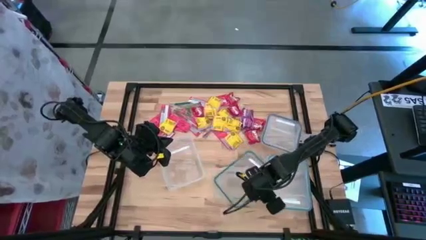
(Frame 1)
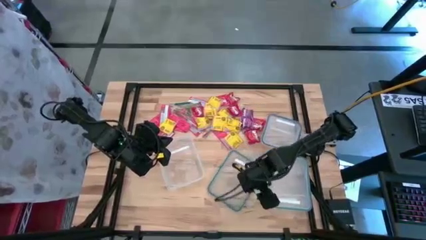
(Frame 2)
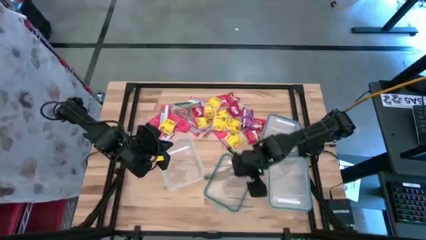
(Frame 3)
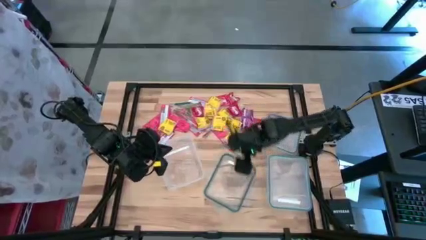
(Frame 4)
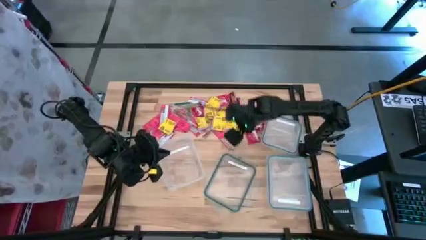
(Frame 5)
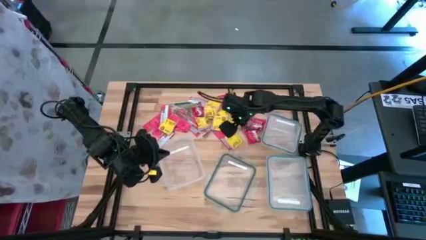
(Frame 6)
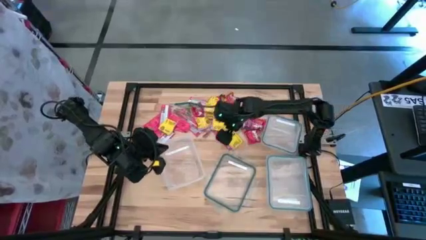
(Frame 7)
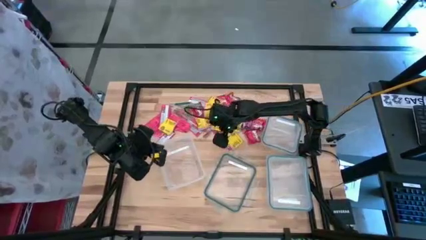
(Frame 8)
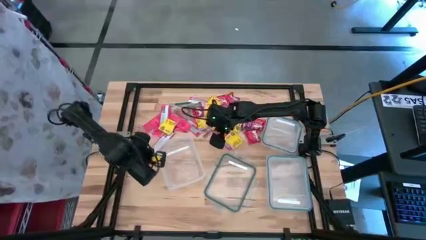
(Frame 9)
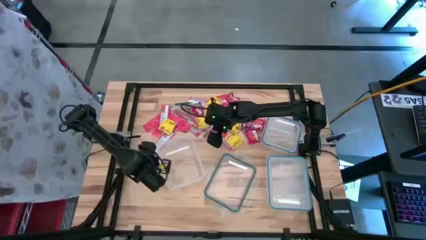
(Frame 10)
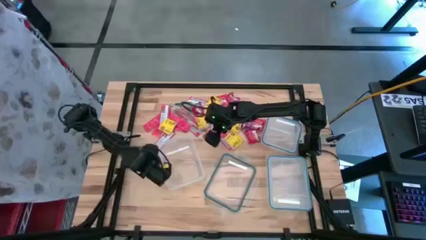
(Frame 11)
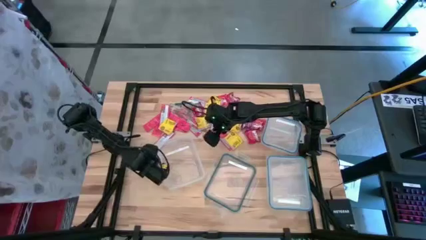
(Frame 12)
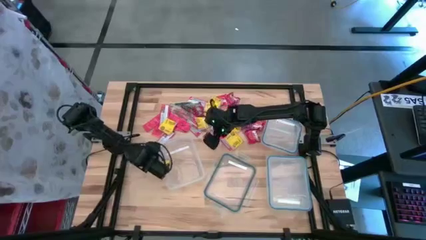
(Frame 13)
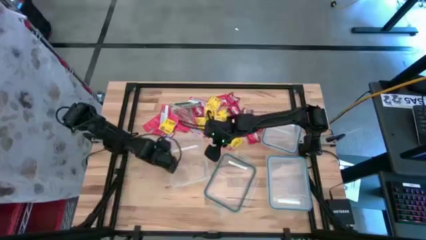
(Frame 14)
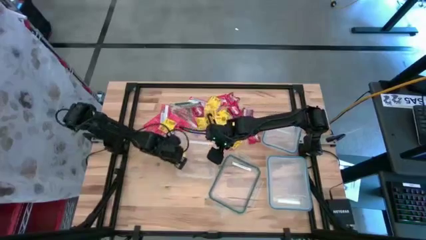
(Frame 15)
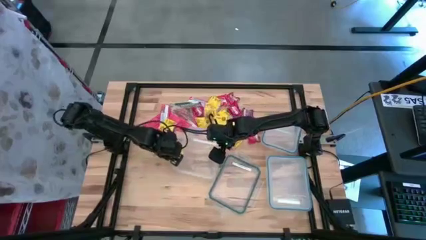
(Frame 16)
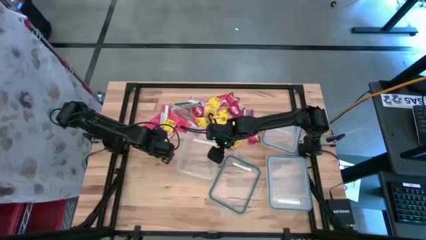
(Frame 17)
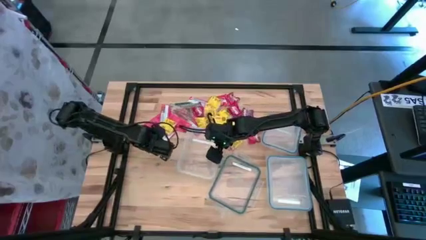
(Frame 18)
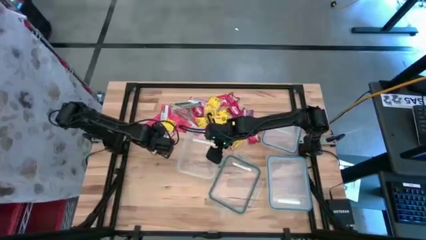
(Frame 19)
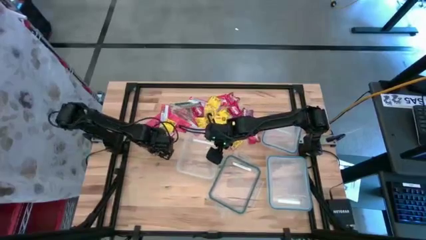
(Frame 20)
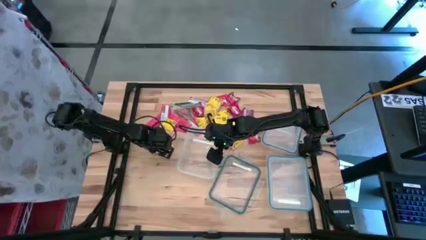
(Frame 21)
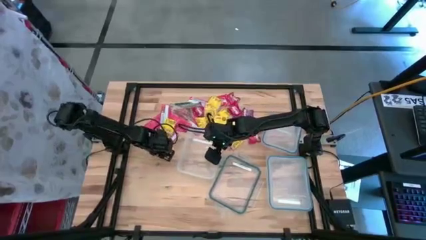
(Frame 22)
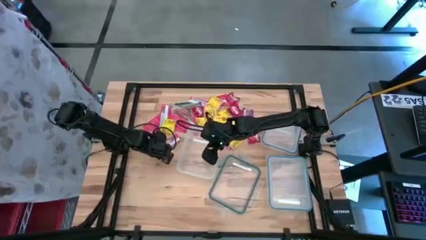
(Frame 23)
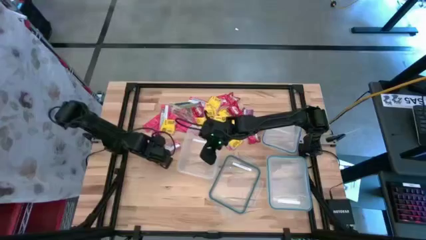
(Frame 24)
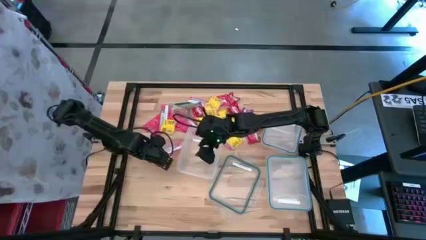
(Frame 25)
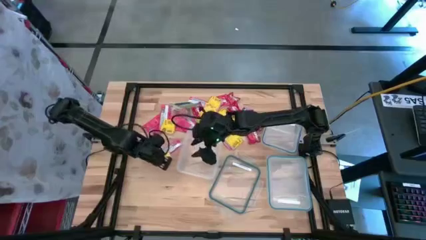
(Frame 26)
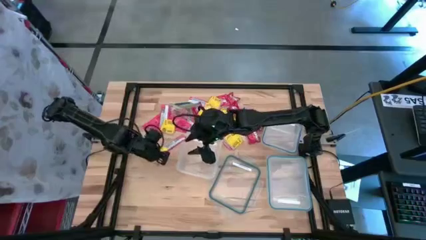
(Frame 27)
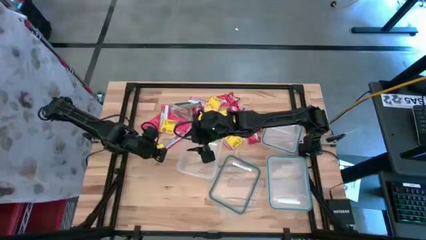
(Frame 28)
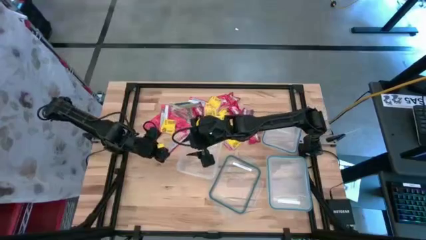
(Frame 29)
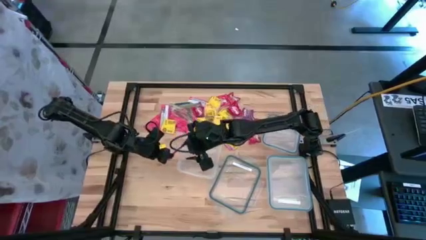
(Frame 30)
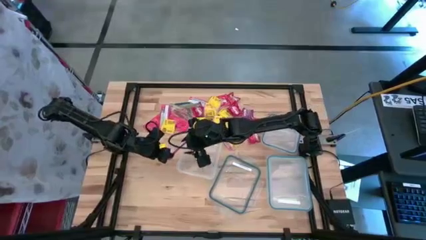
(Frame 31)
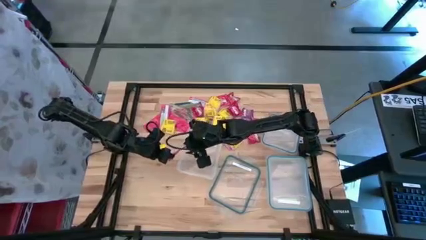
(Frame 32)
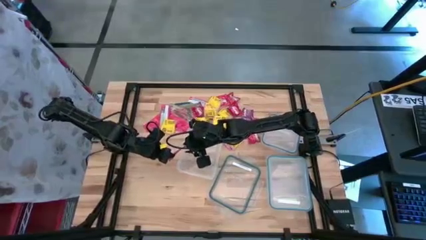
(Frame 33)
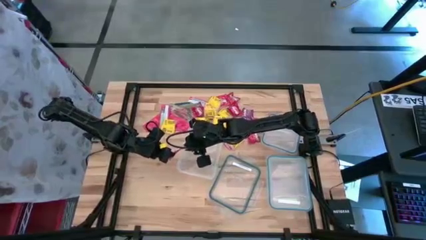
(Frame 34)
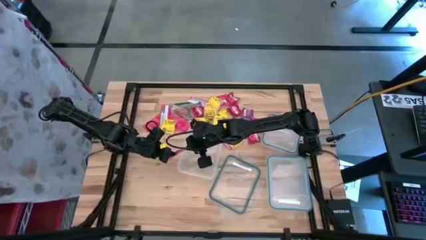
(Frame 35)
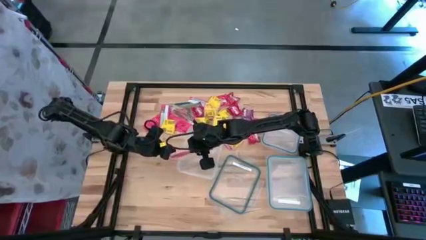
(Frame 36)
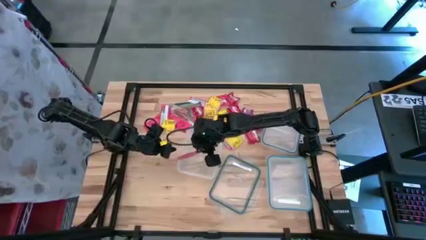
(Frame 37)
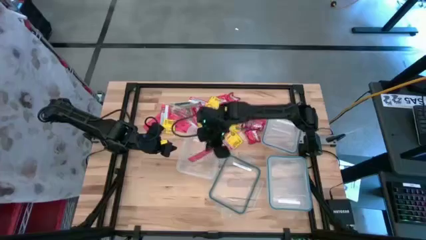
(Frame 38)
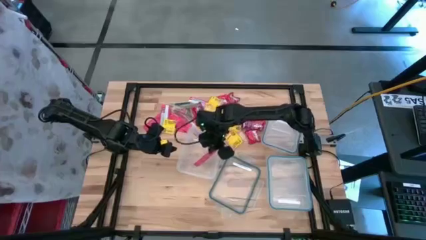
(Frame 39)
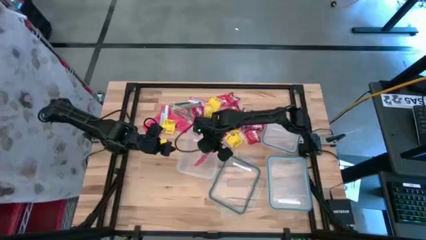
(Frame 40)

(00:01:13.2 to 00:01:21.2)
Task: Sort candy
Put the red candy strip into the rectangular transparent bin

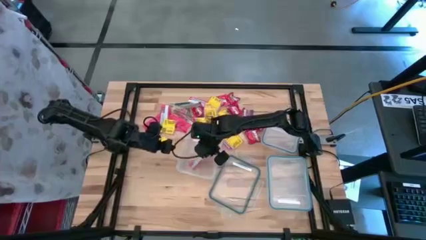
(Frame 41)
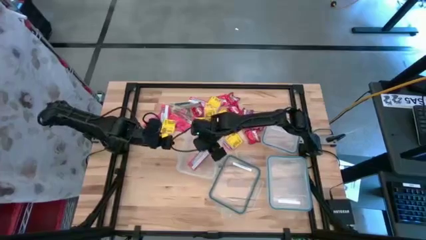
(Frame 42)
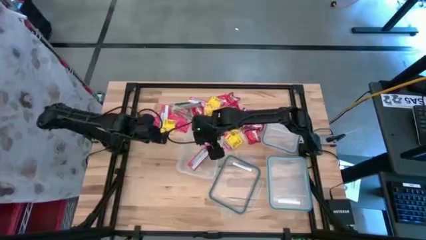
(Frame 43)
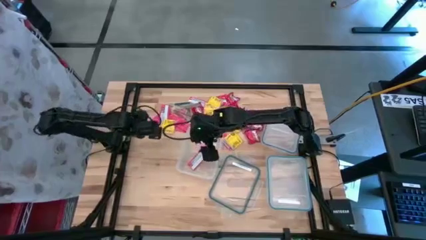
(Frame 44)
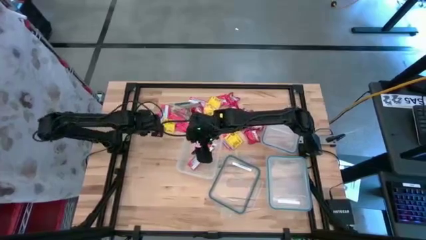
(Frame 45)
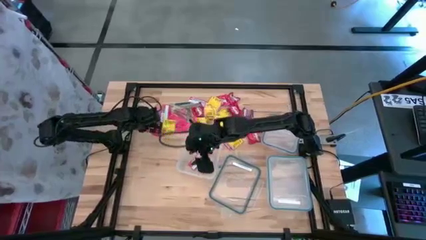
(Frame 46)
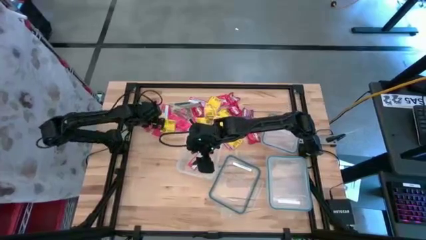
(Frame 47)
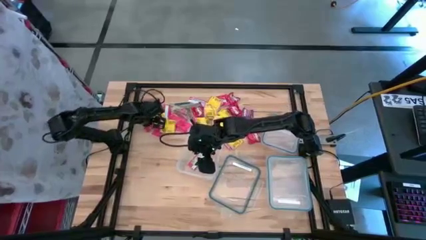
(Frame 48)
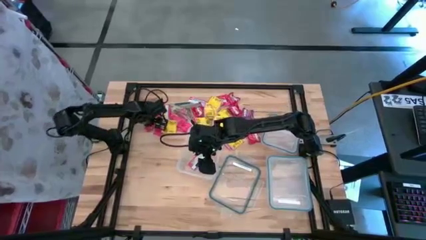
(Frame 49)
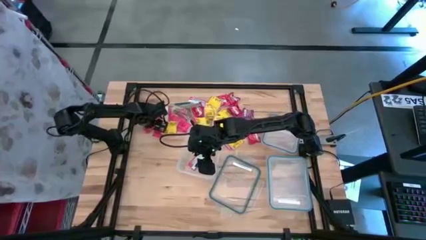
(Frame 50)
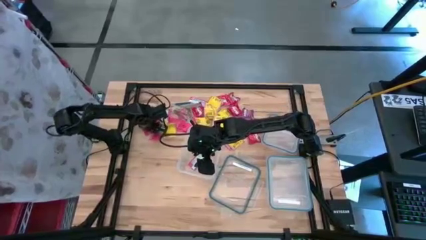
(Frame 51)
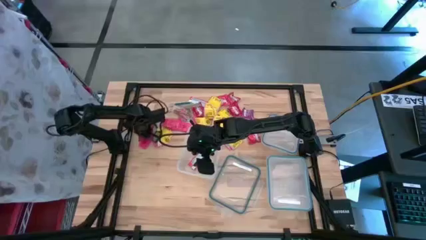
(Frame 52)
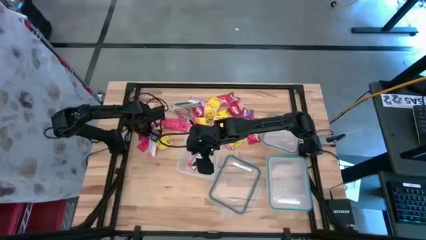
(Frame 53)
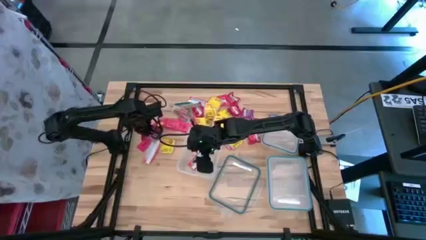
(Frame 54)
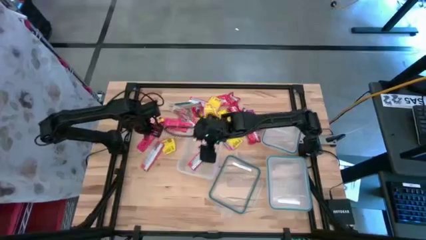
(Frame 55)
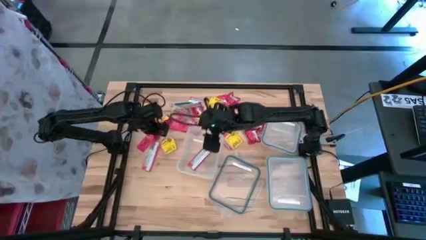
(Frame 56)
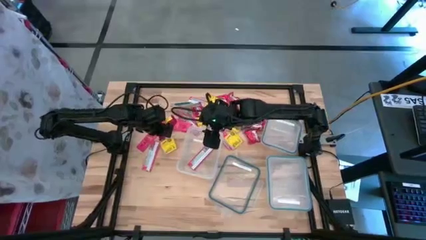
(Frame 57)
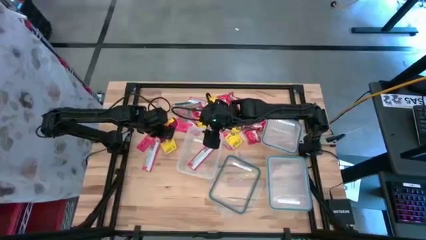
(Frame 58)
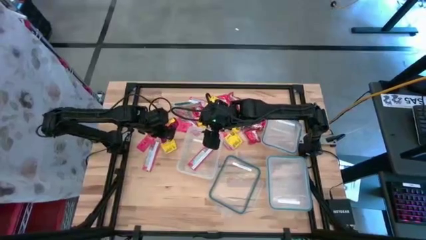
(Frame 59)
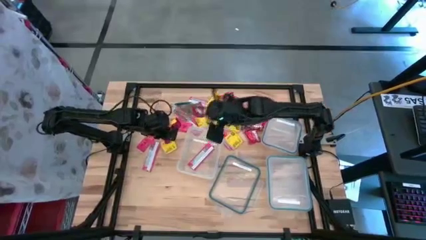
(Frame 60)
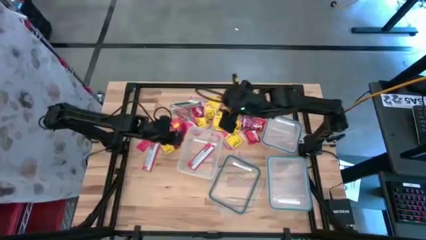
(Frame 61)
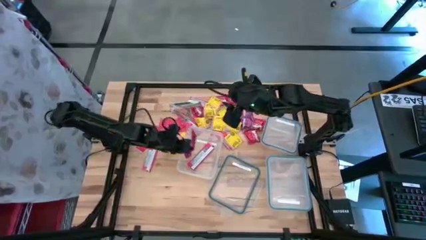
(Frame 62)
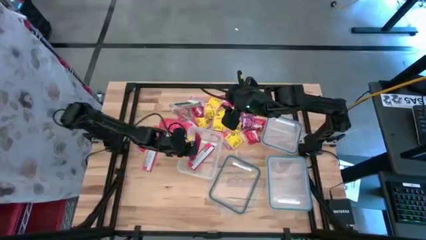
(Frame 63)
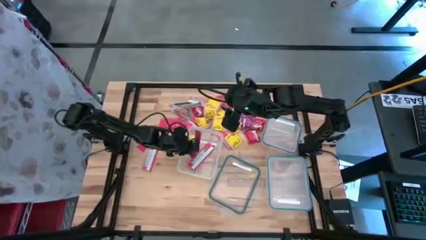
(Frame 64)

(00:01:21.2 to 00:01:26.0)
Put the red candy strip into the rectangular transparent bin

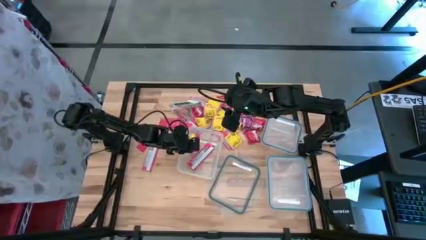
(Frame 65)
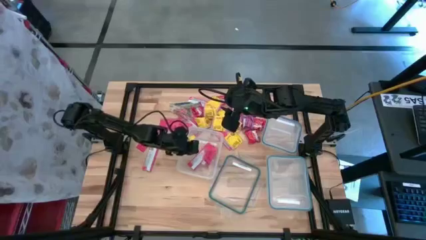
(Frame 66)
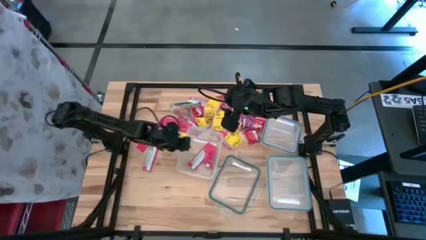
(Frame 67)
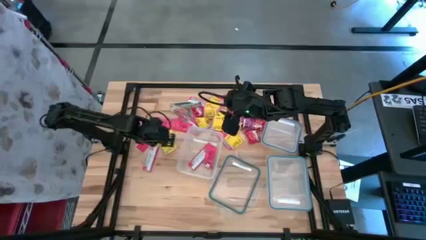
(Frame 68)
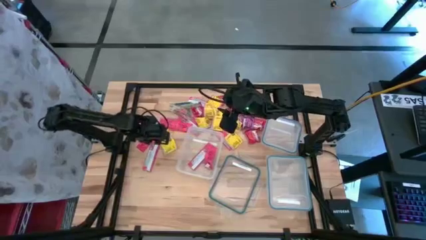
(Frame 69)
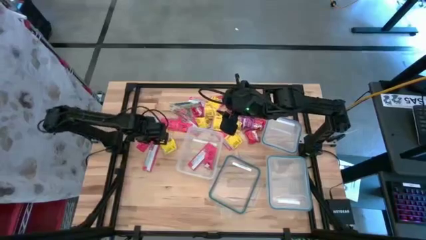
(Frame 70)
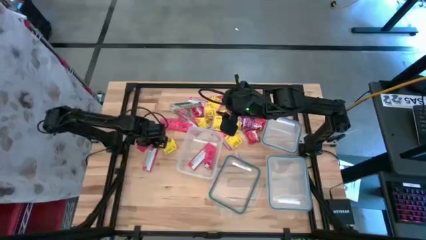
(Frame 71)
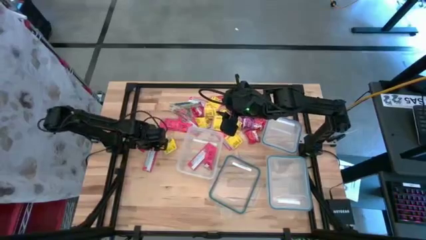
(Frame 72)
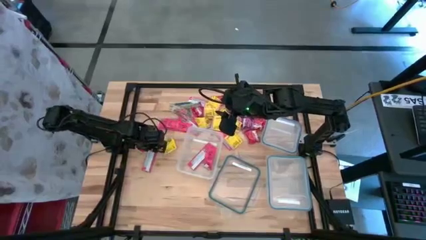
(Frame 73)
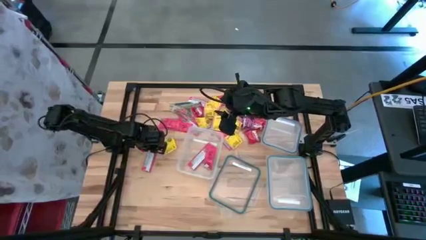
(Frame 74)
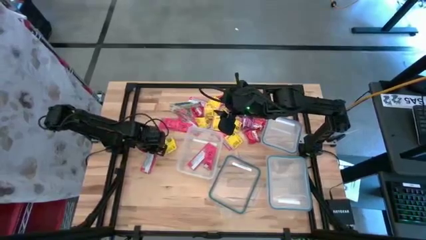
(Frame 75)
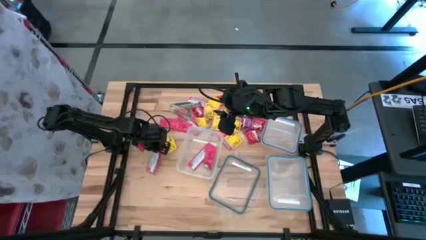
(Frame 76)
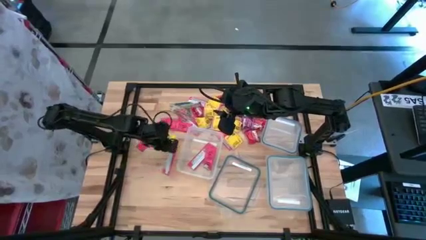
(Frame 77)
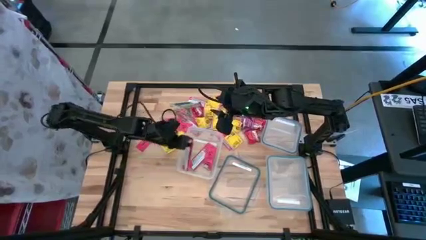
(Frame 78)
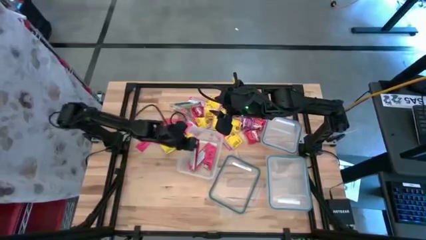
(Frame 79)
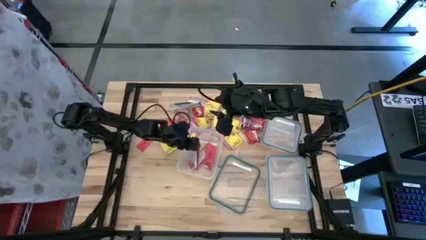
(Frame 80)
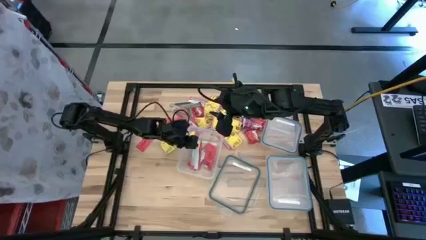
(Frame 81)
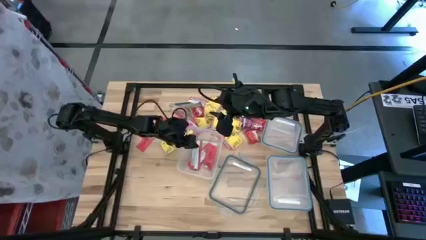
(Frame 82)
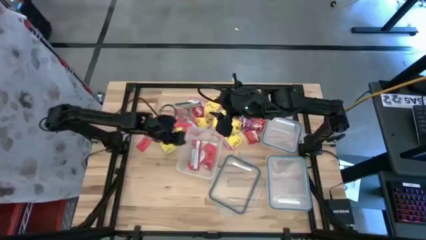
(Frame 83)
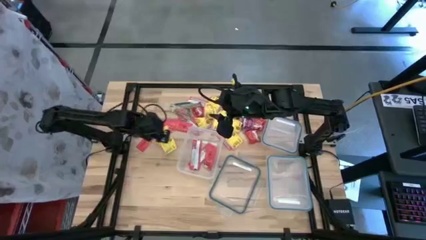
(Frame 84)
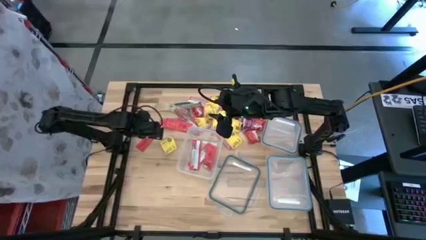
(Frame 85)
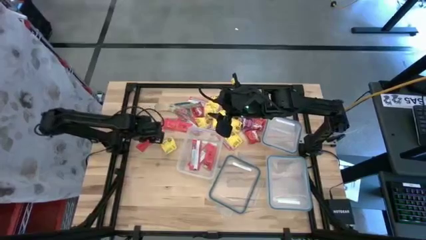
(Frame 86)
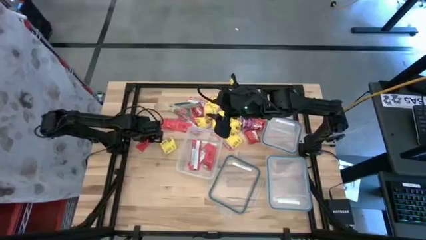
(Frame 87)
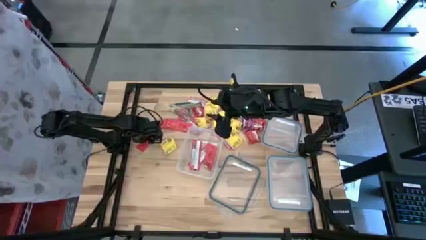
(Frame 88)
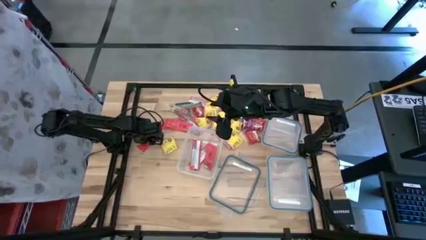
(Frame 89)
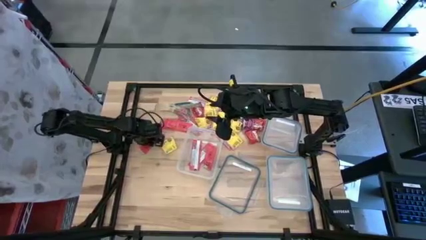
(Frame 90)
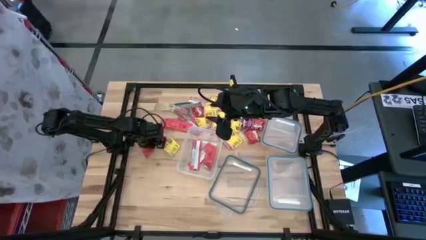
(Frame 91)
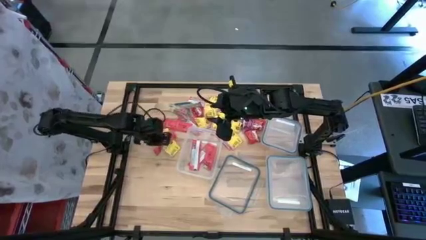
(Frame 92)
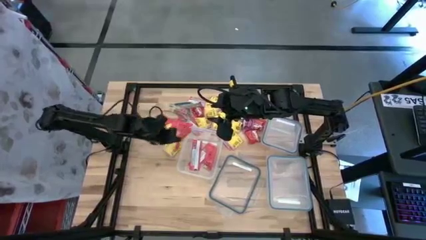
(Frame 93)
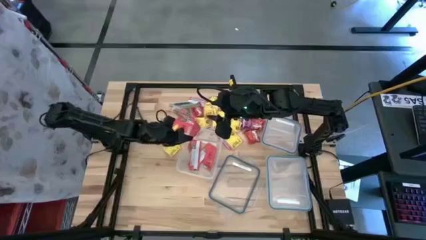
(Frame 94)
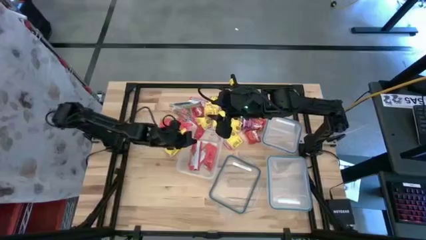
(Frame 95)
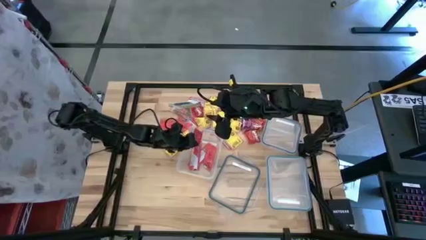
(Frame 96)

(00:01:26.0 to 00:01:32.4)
Put the red candy strip into the rectangular transparent bin
